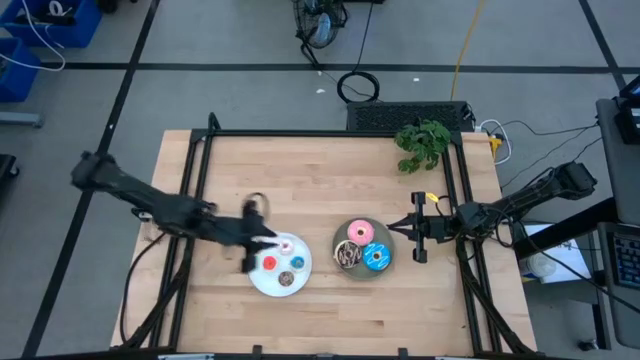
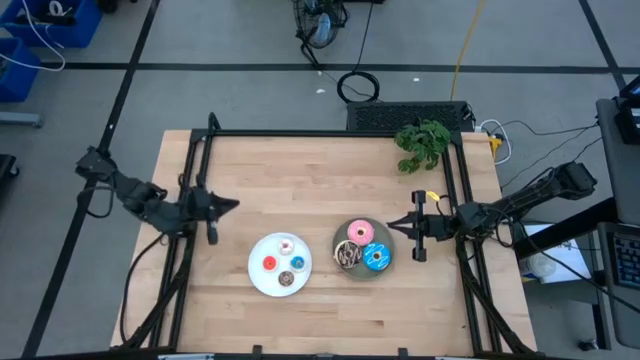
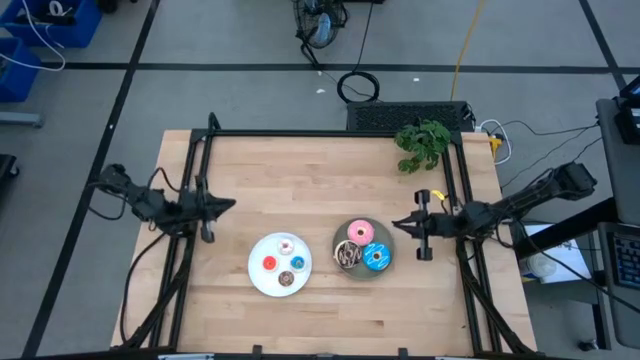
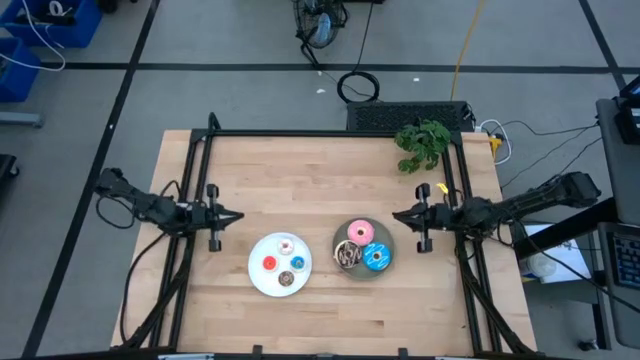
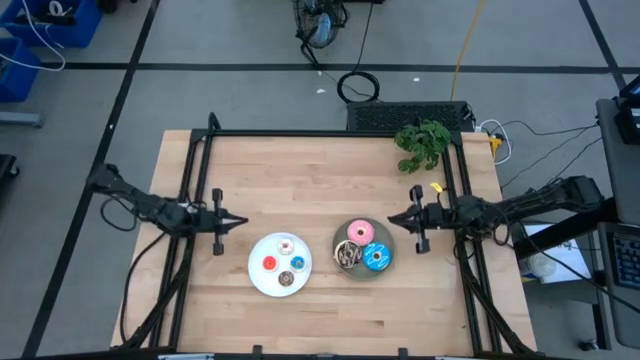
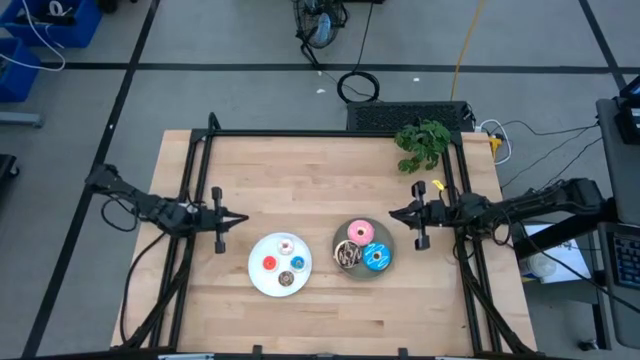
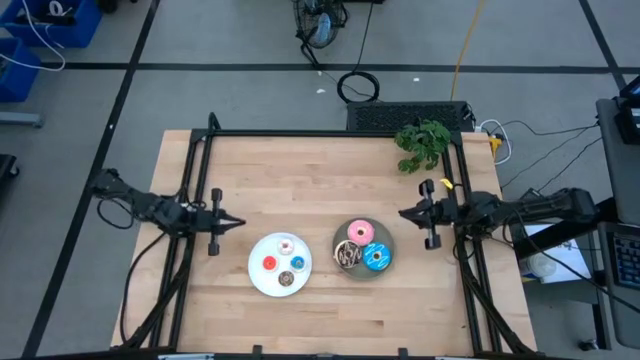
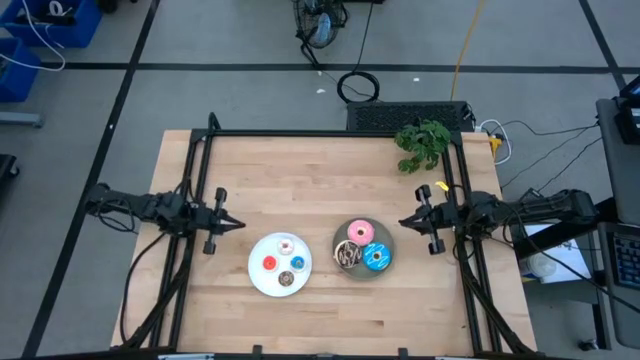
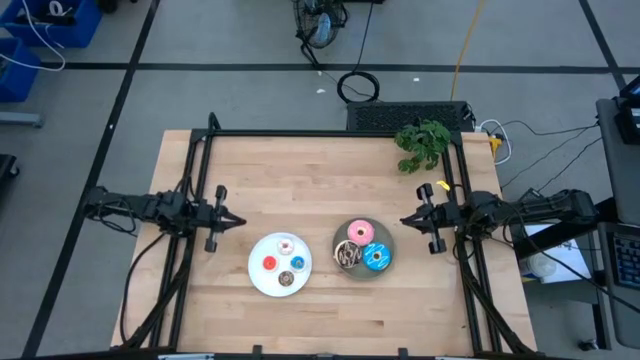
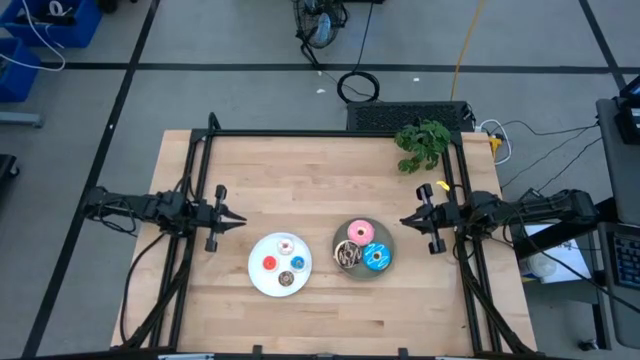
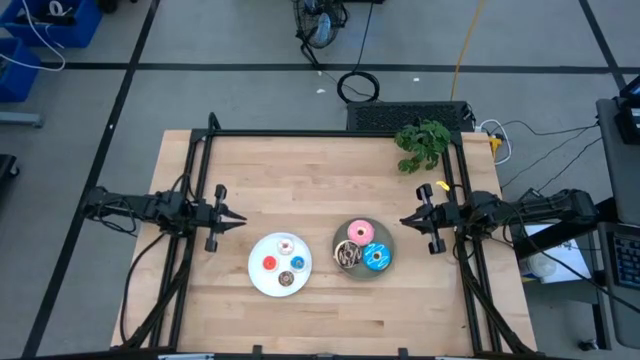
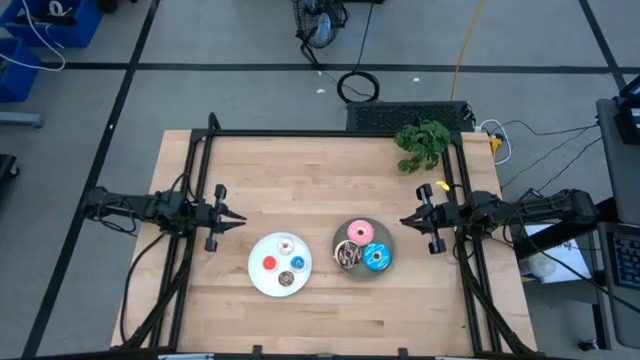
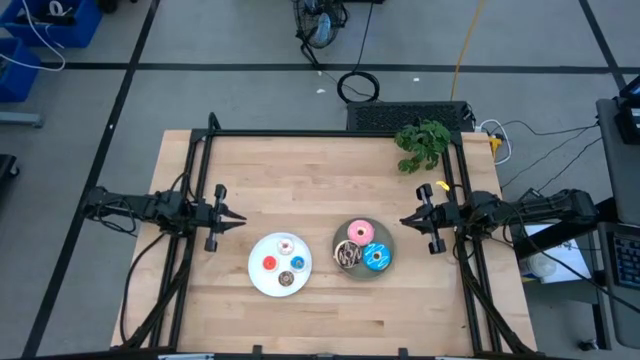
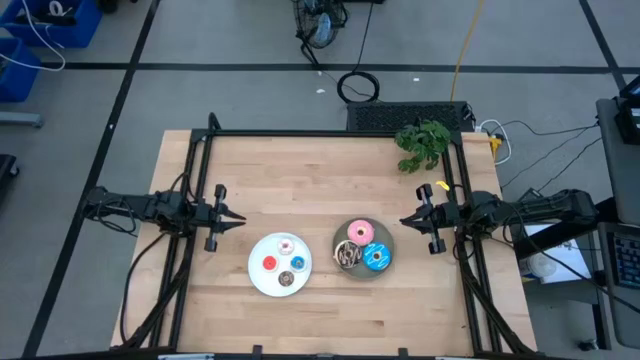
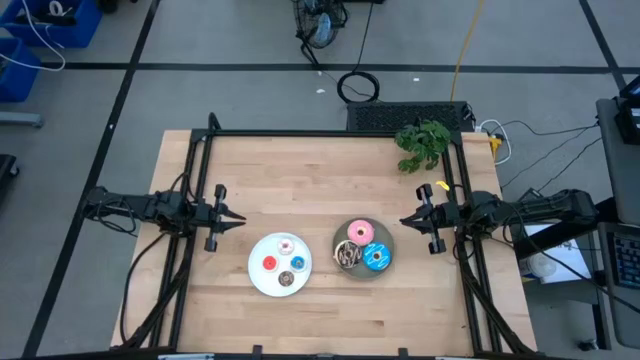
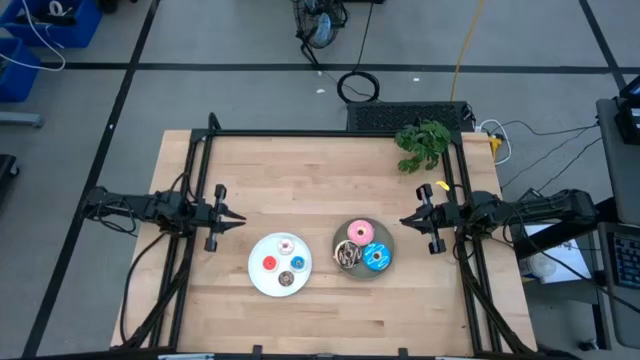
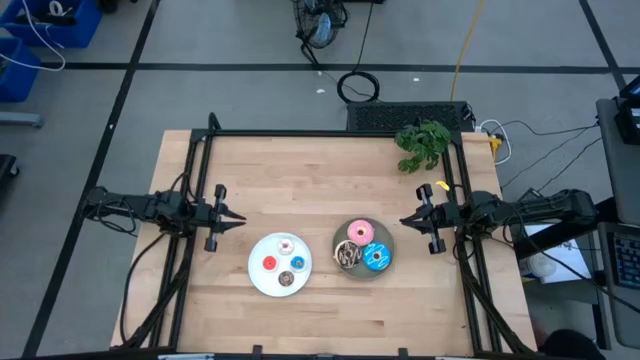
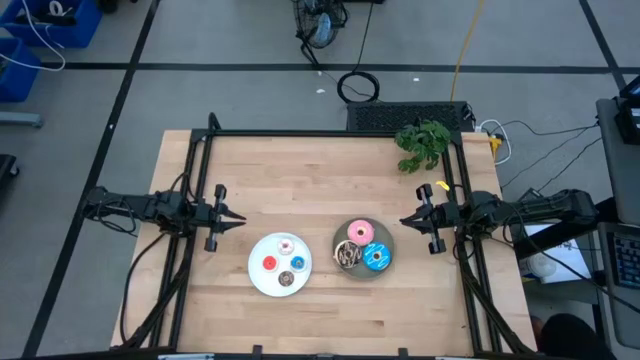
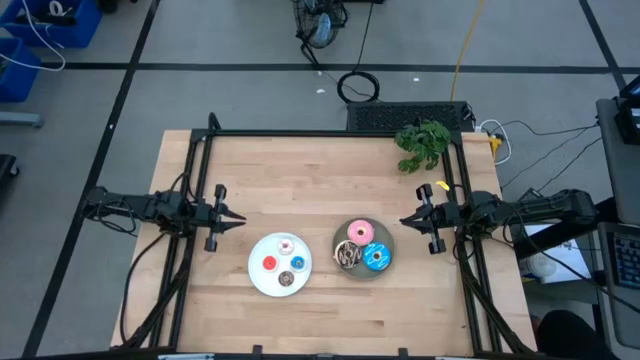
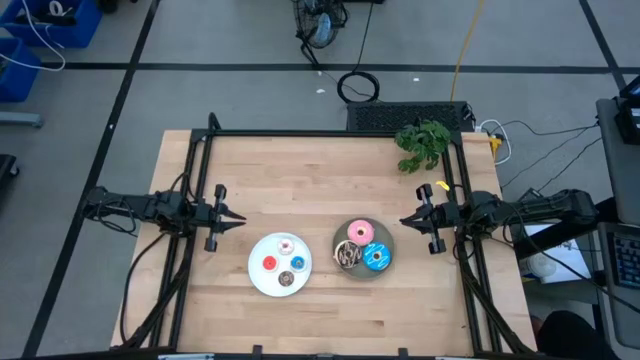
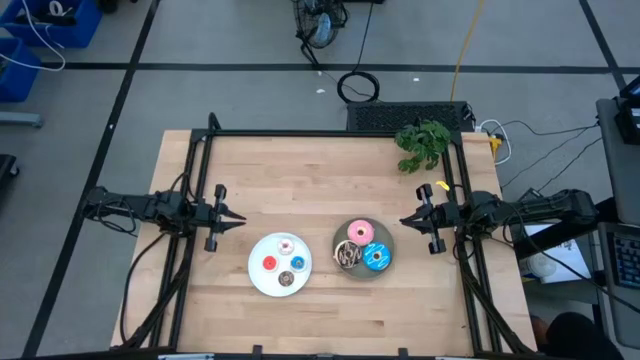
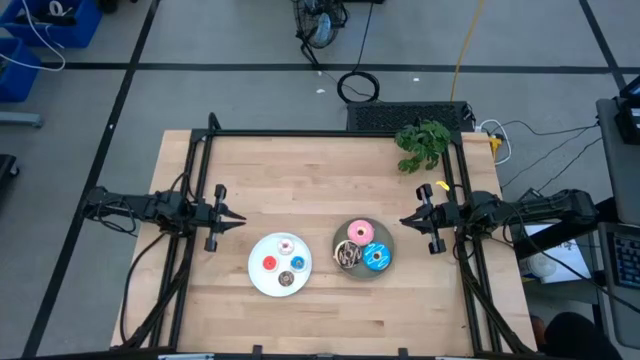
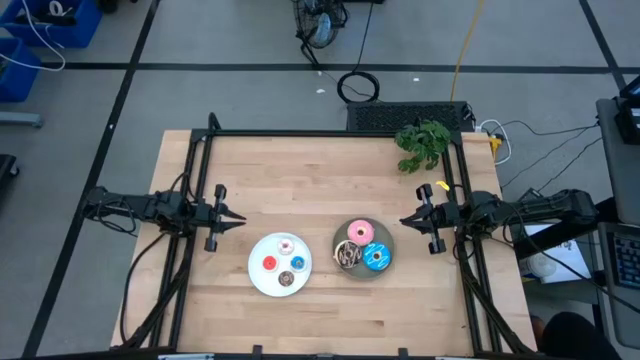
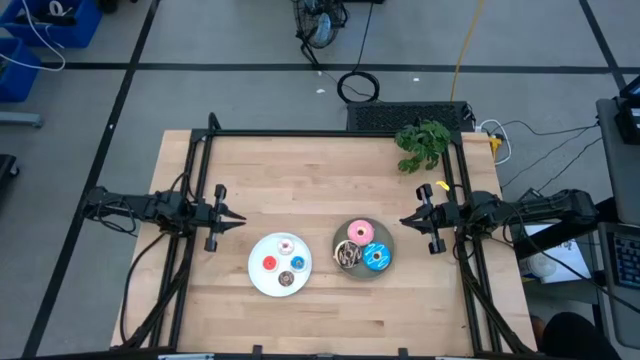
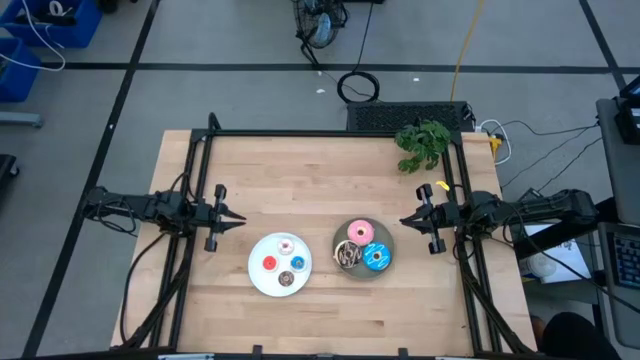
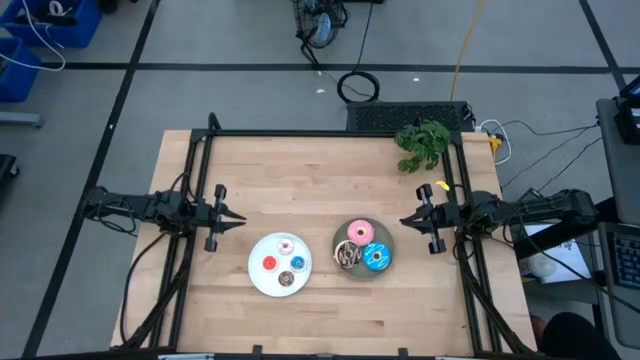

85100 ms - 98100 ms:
Task: Pick & Place donuts
Return to Home Position

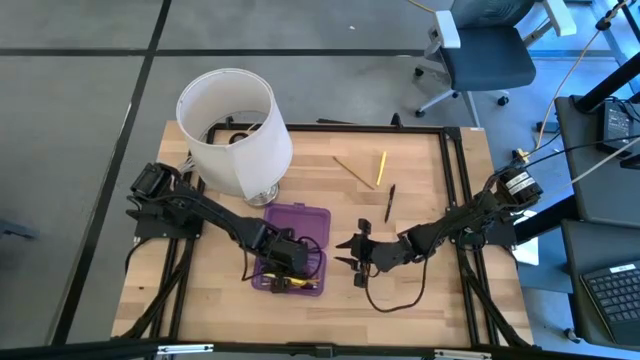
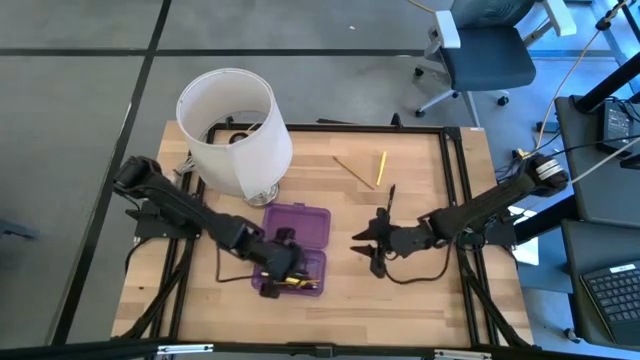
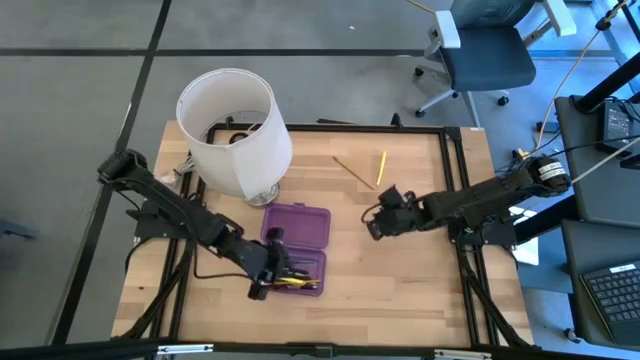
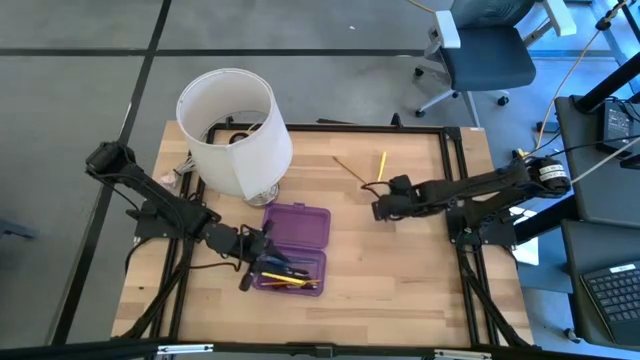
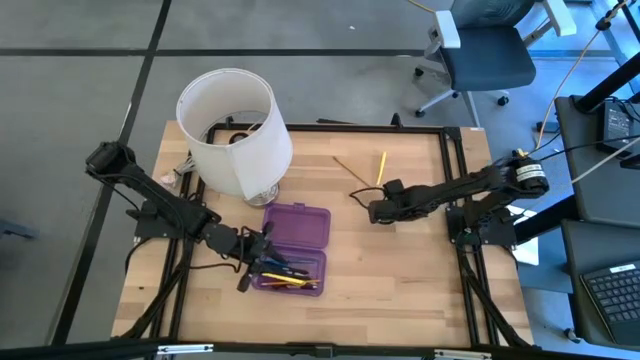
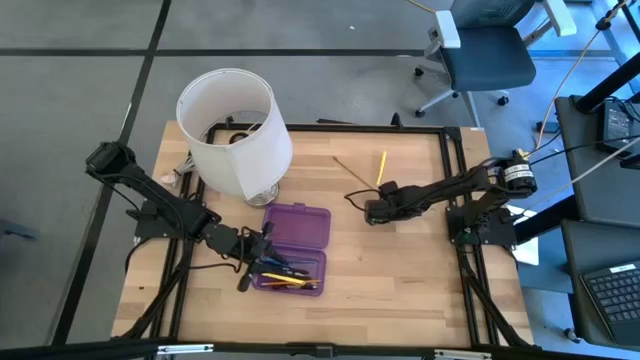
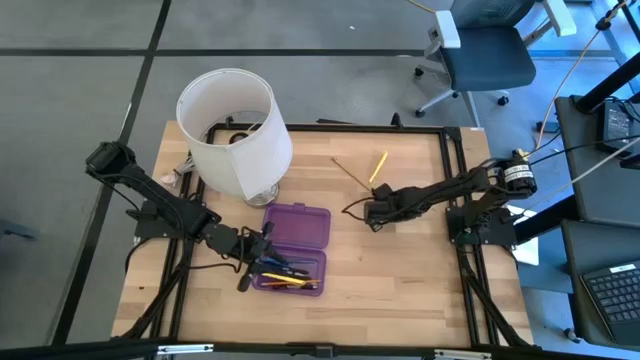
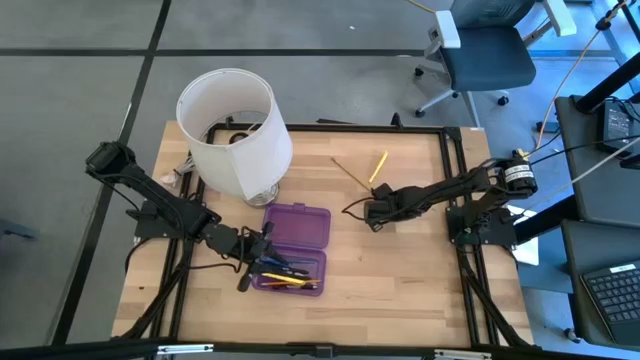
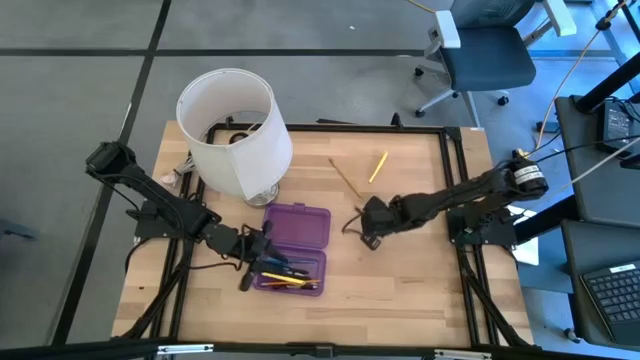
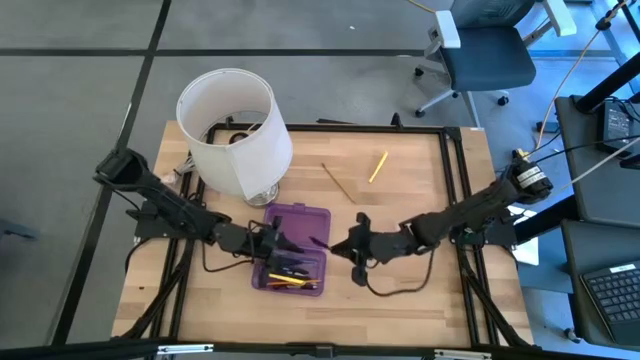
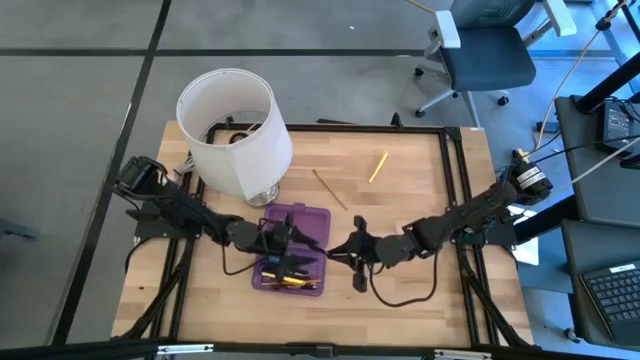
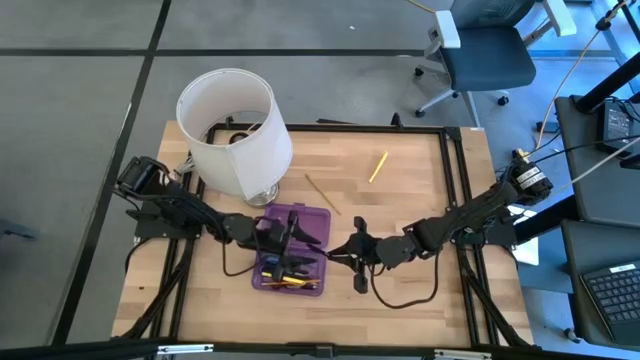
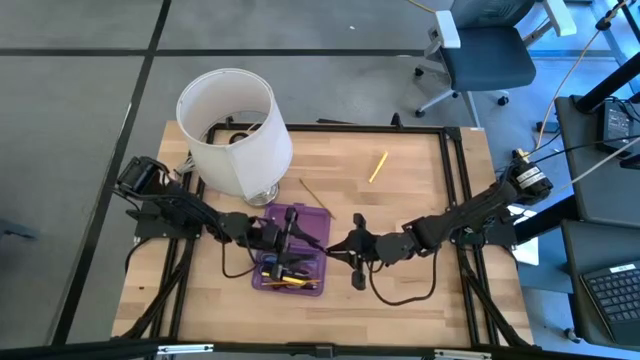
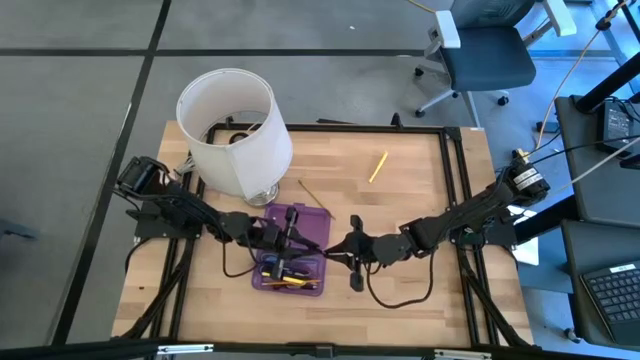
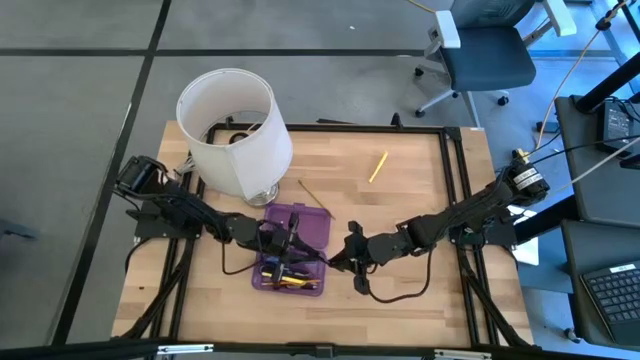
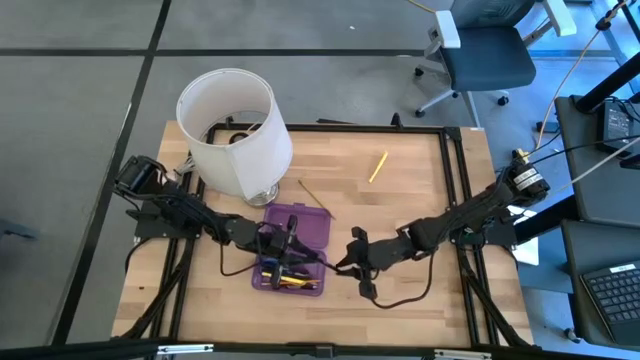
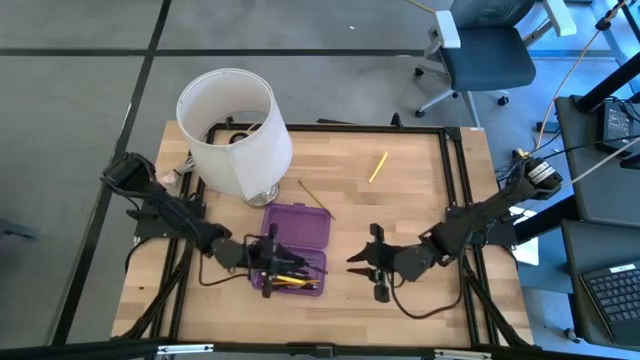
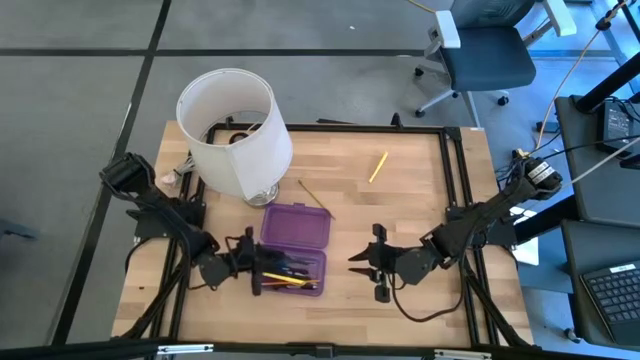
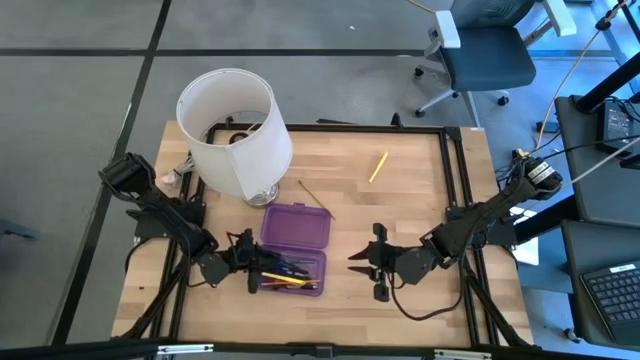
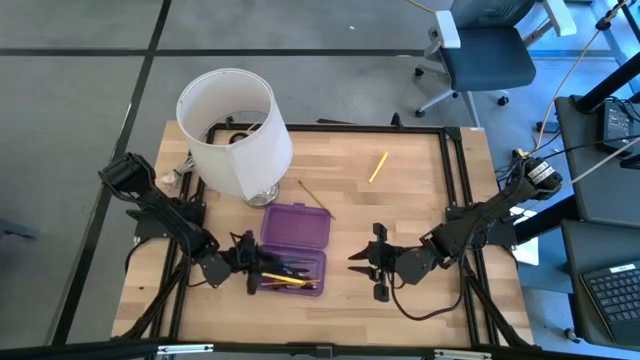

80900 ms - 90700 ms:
Task: Pick & place school supplies into a supply box
Put the black pen into the purple supply box
